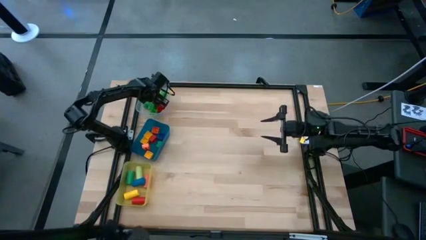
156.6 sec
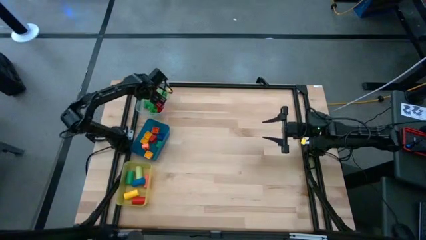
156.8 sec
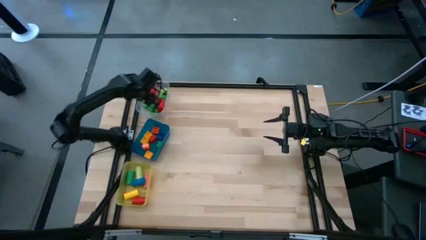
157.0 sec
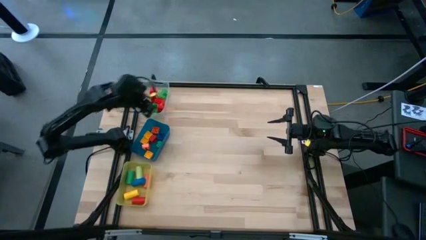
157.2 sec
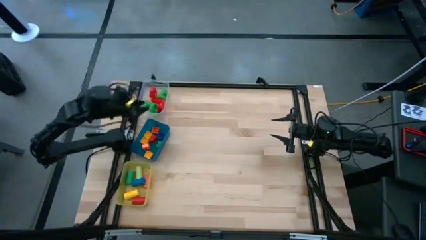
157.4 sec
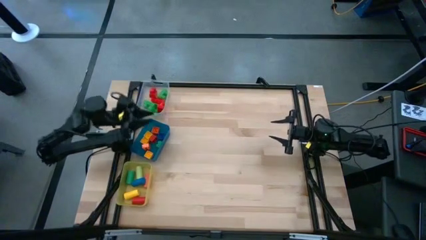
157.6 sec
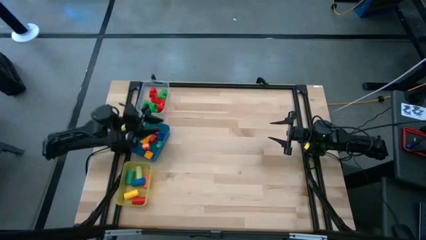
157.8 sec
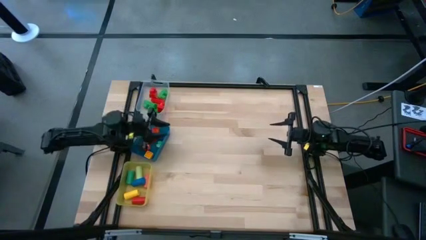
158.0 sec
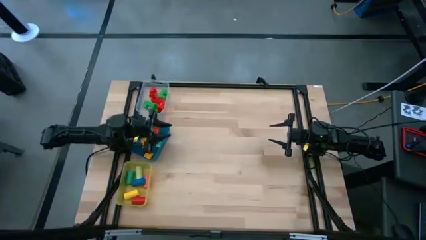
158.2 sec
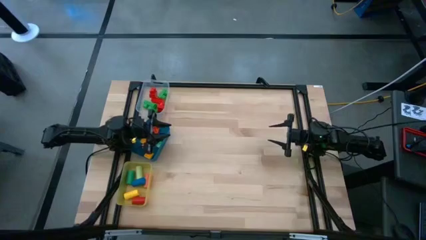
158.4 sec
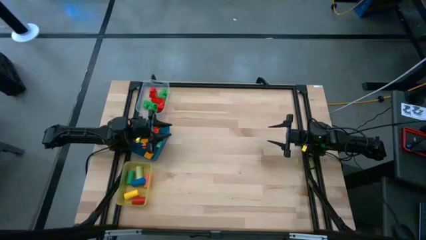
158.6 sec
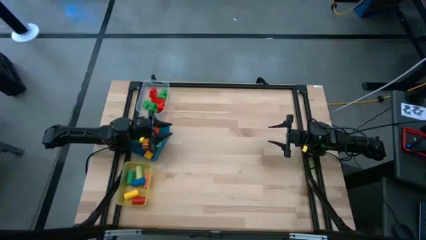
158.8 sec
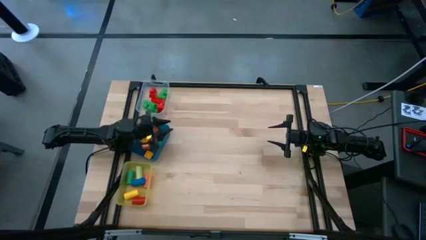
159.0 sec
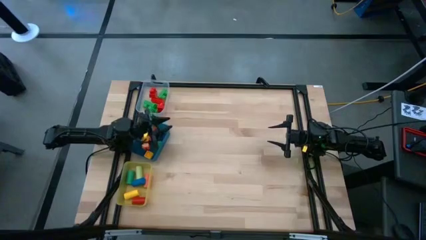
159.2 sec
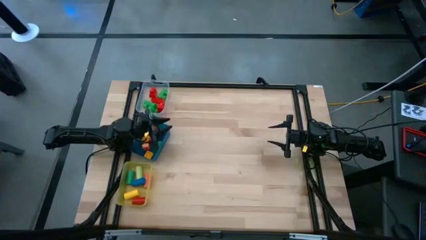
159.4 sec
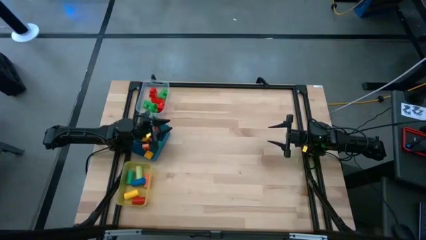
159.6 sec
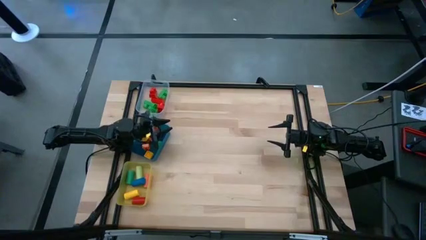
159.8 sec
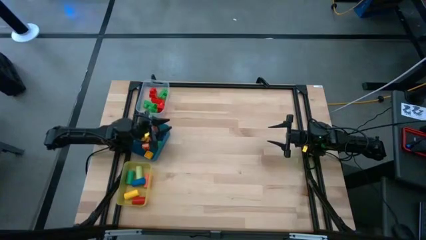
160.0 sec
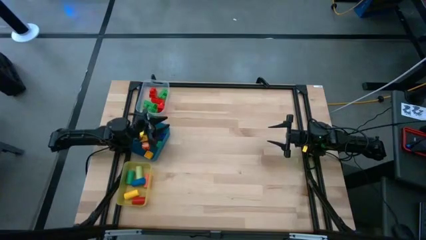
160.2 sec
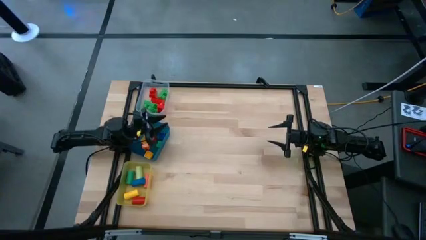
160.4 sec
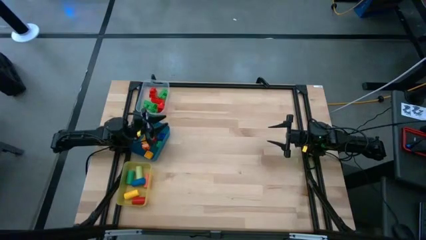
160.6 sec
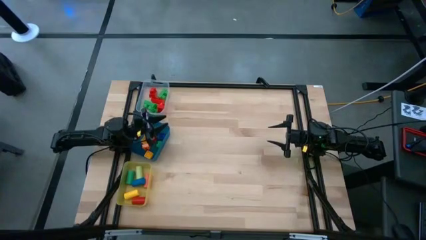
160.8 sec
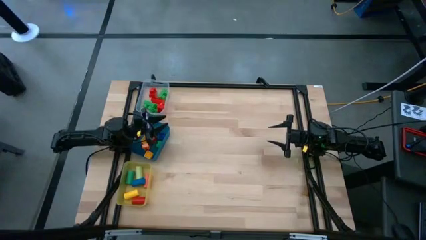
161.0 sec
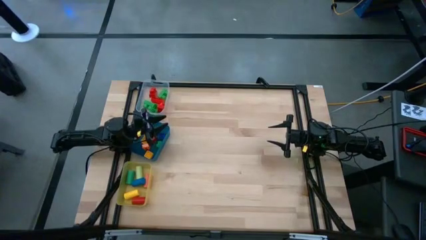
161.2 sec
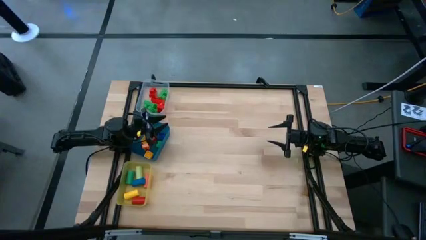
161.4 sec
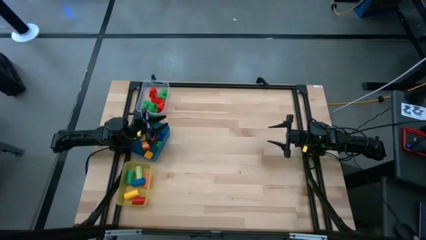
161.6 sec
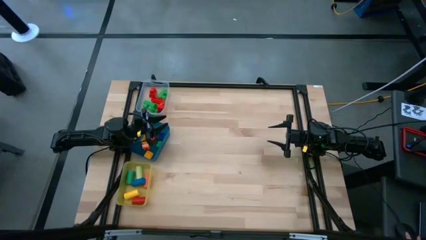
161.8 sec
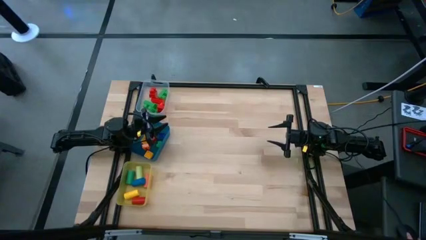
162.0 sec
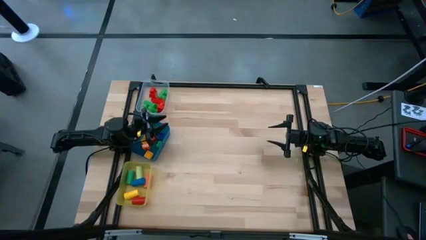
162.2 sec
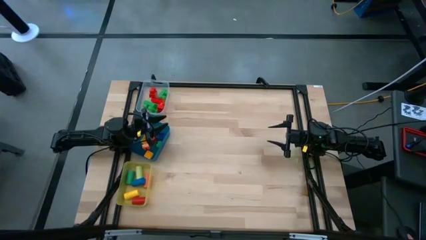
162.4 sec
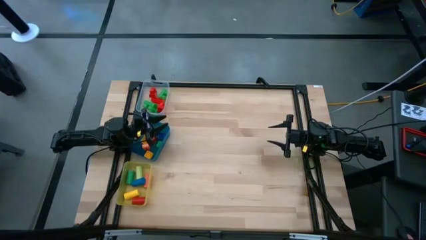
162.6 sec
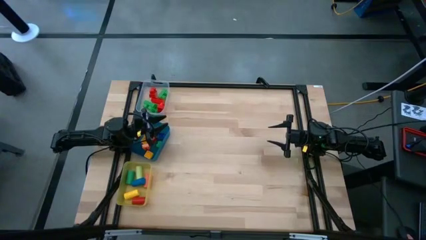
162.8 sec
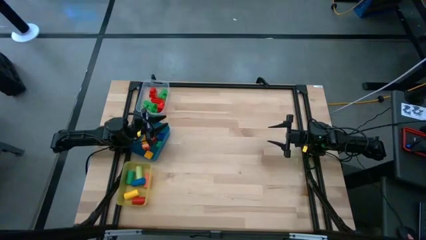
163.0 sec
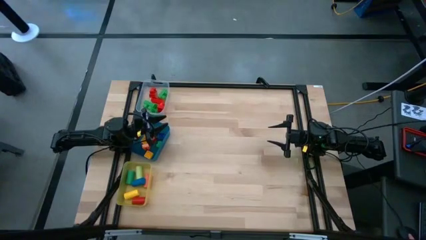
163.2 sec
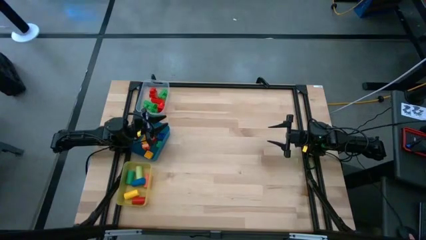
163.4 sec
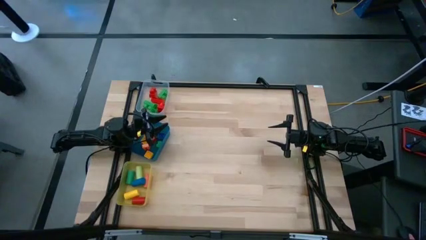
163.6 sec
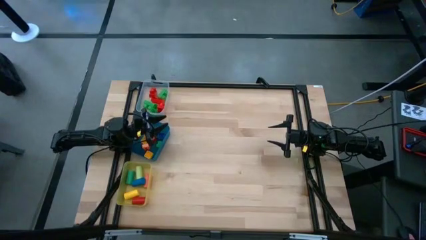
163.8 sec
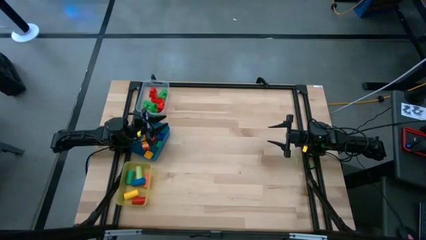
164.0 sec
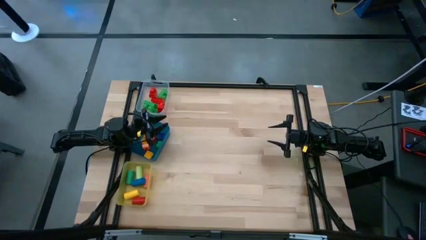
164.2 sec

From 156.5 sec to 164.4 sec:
Task: Sort blocks by size
Return to Home Position

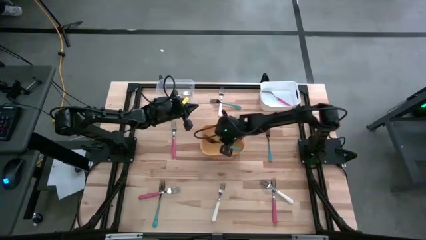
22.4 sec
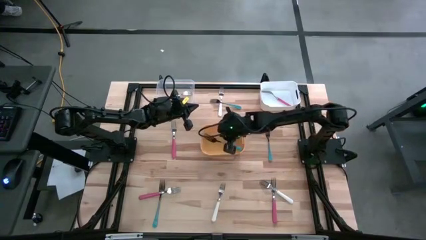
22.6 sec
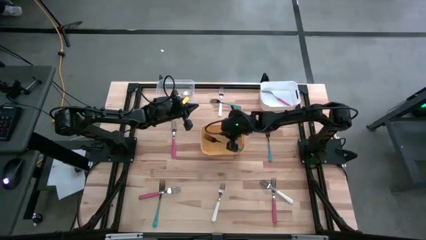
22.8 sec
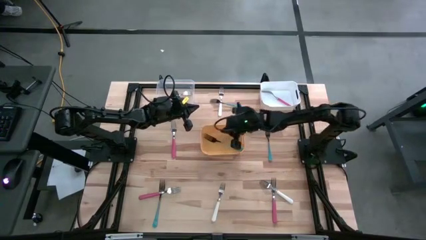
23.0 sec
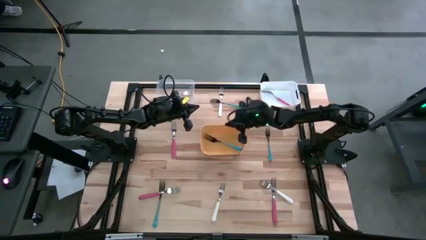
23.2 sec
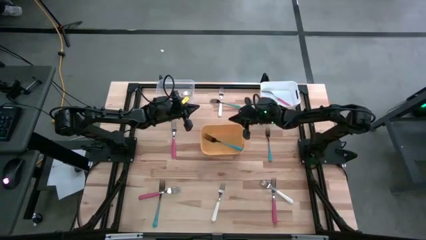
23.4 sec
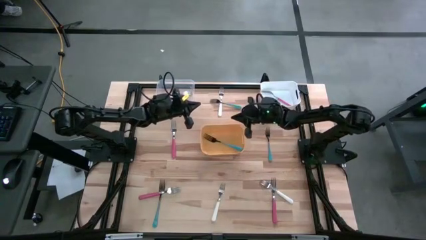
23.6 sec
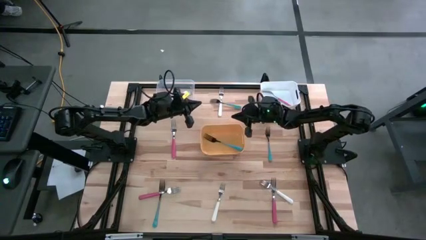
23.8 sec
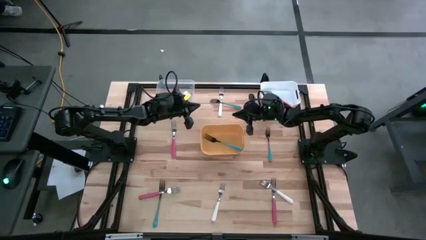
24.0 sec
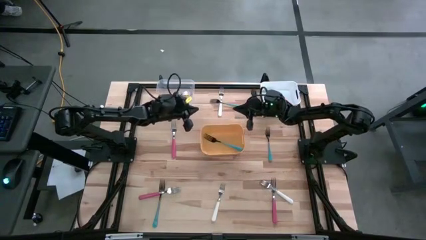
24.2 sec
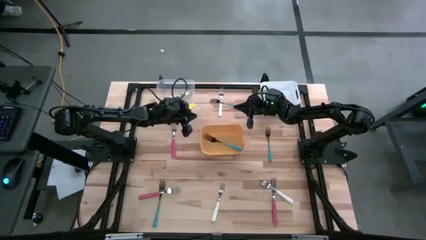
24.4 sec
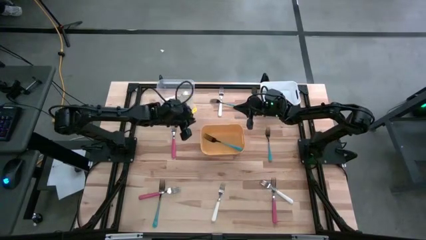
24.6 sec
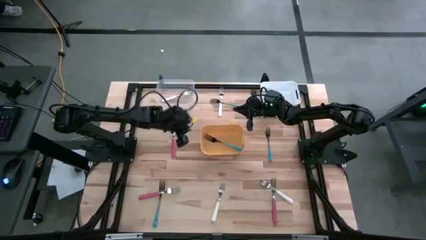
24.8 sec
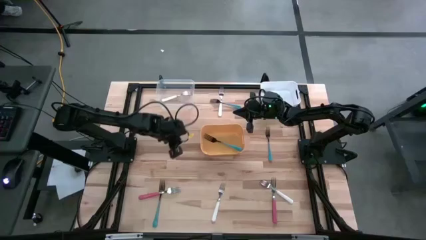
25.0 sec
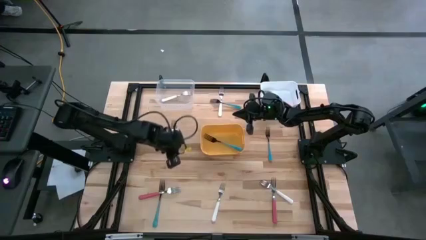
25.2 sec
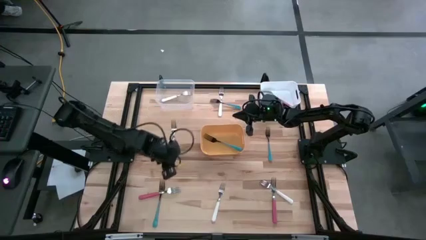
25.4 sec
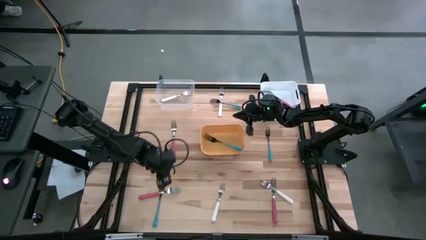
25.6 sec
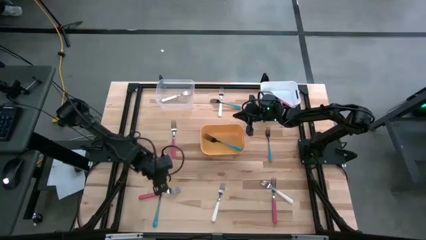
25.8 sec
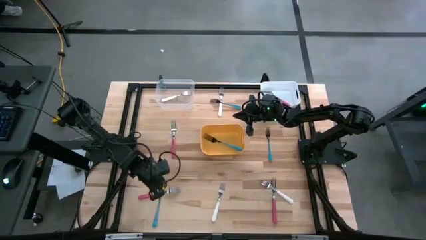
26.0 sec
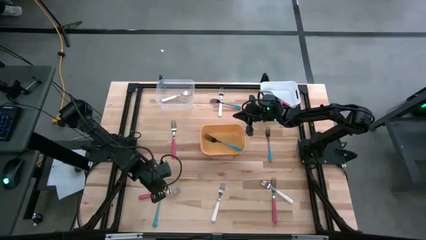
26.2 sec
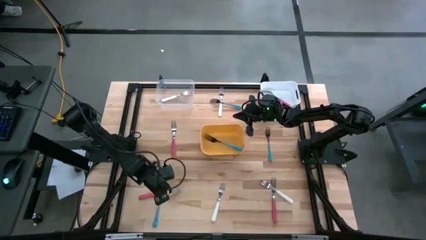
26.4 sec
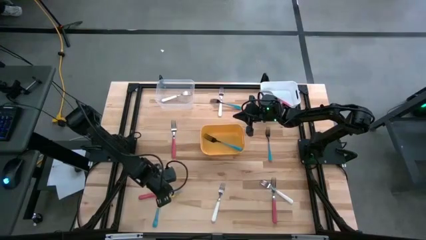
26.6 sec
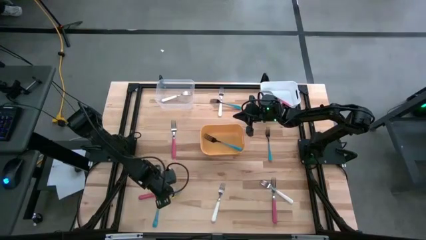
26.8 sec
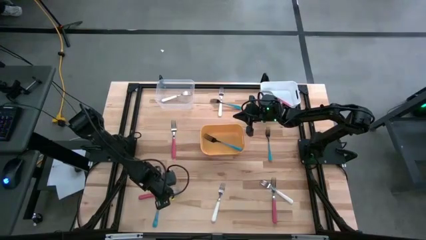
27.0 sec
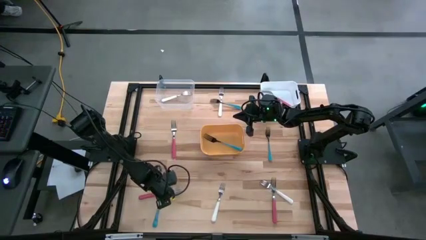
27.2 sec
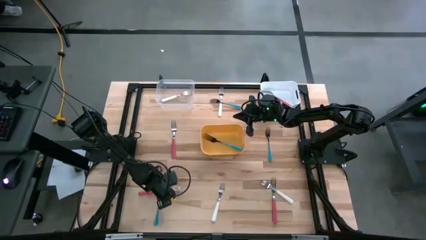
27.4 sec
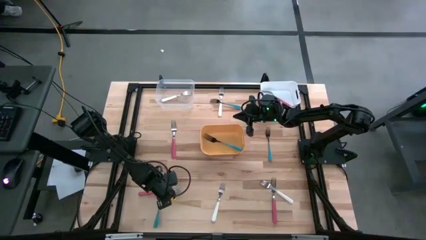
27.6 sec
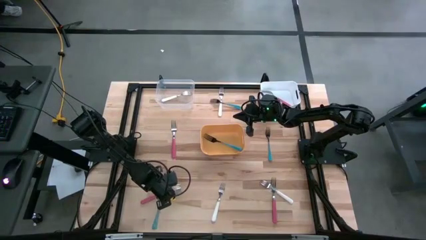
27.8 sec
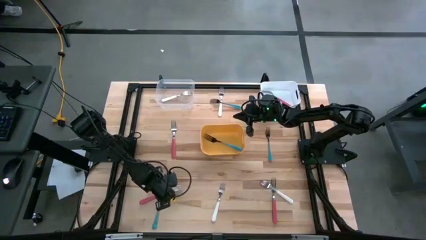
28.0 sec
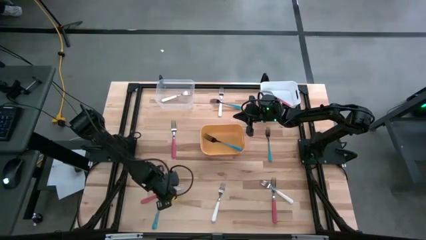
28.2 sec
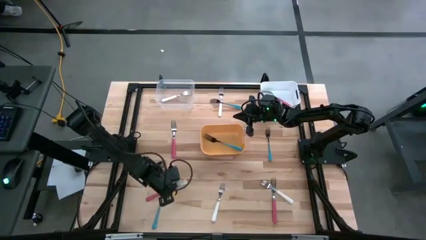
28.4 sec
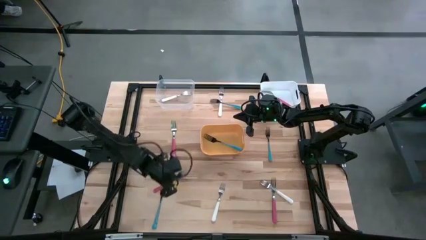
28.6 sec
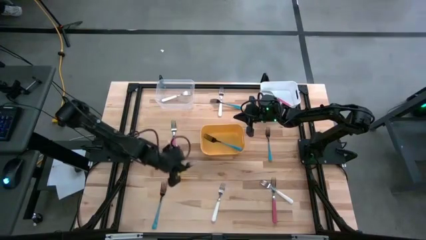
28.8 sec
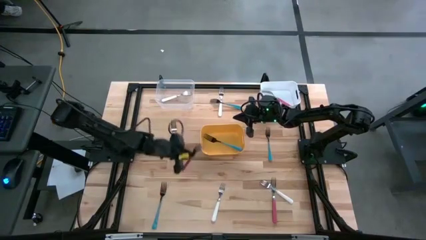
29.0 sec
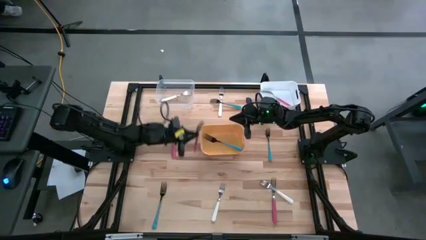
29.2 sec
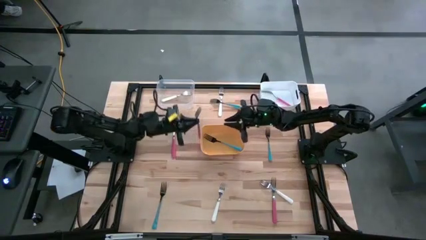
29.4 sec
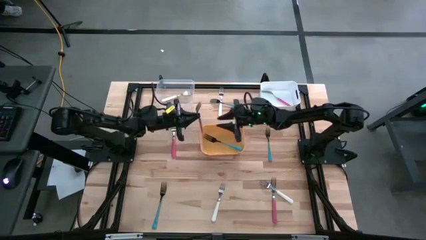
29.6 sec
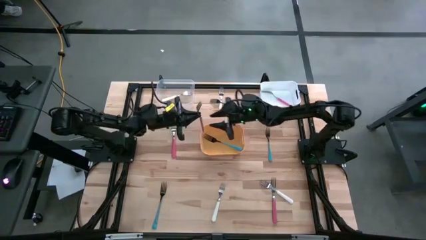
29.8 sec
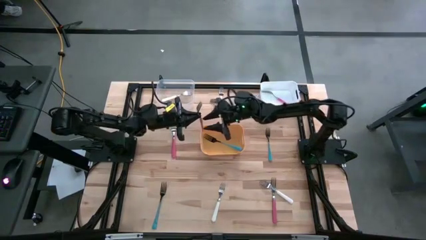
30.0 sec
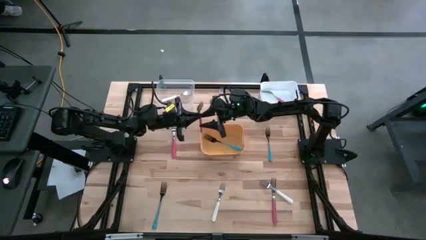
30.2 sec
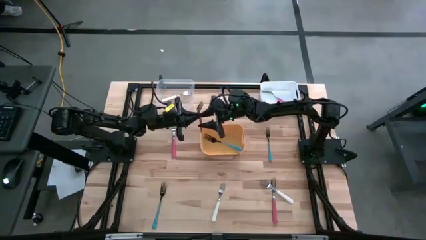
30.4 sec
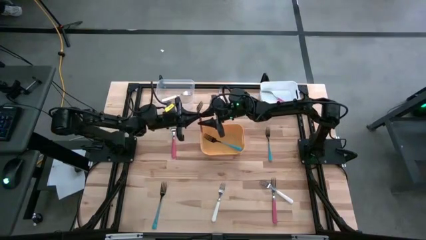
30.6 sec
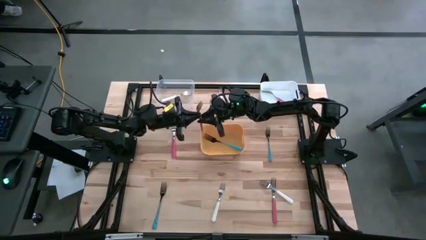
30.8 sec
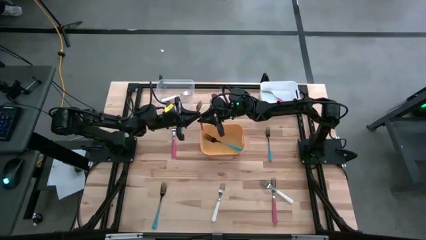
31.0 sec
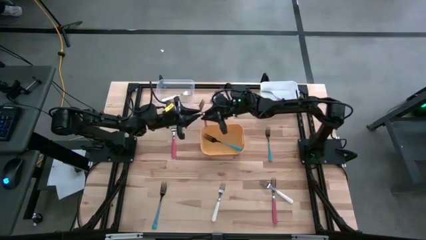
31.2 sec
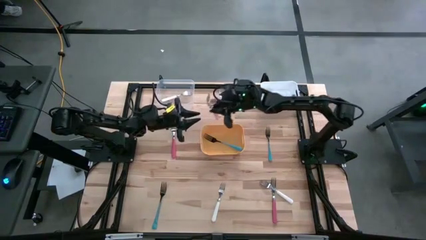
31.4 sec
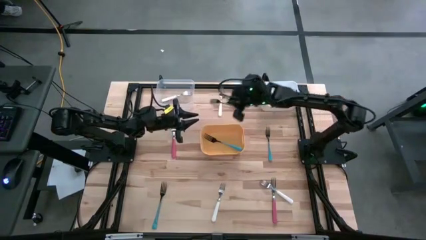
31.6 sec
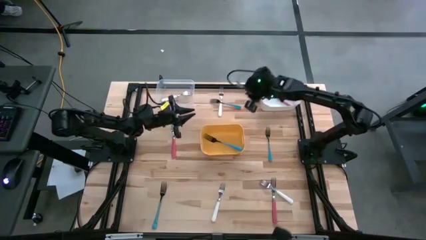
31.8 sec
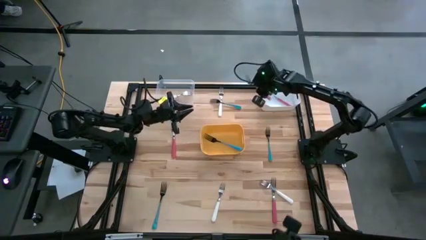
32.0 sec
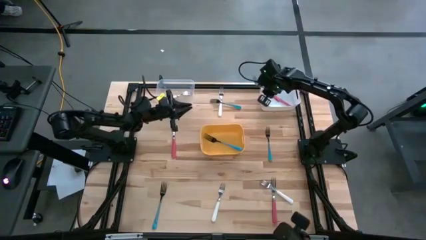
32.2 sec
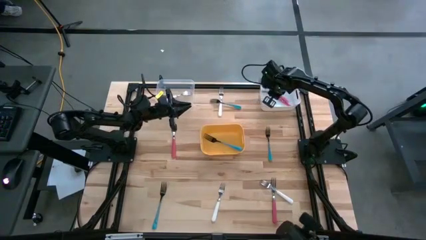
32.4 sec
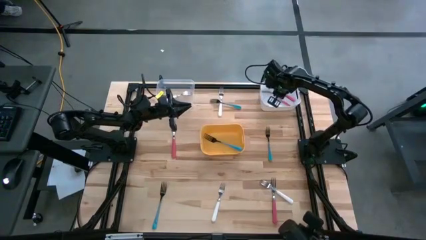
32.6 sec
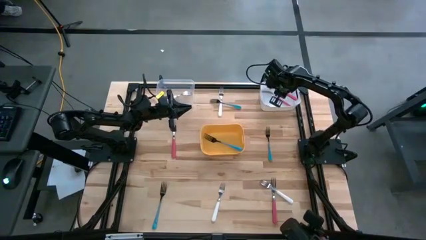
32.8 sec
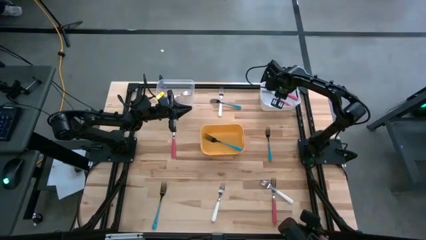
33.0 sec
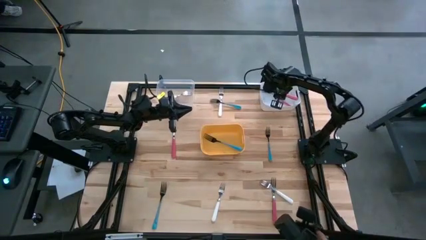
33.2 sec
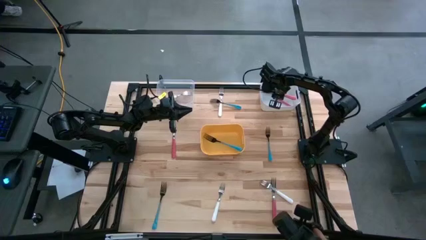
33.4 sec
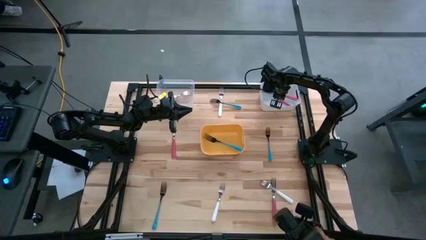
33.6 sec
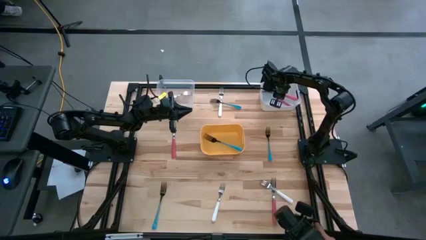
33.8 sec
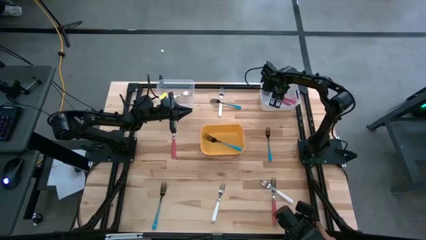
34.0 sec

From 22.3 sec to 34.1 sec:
Task: Sort silverware by color (type)
Put the pink fork into the white bin
